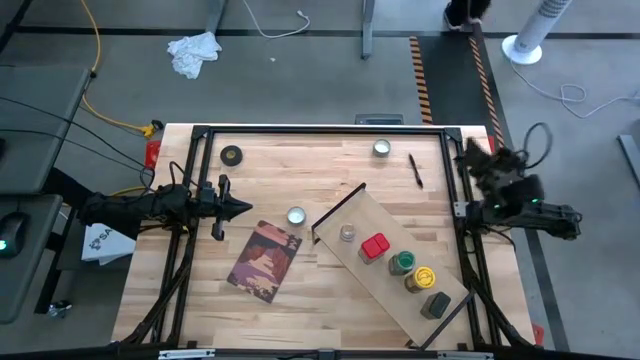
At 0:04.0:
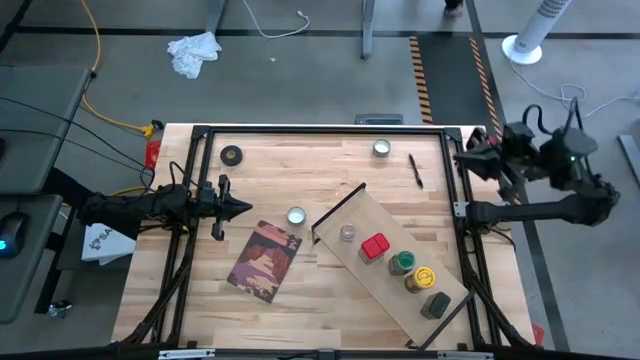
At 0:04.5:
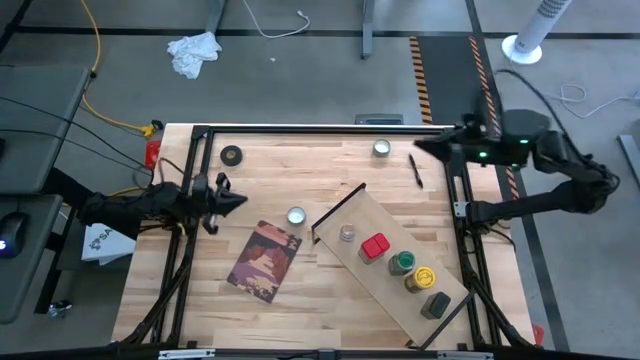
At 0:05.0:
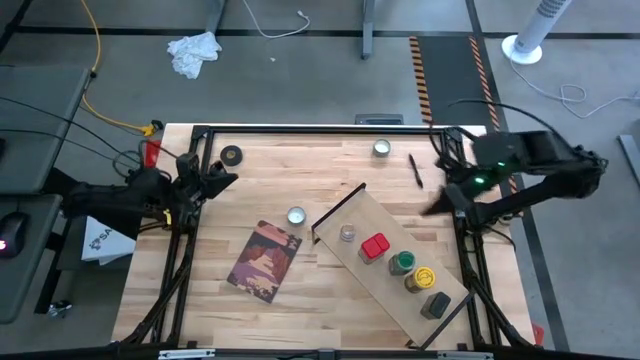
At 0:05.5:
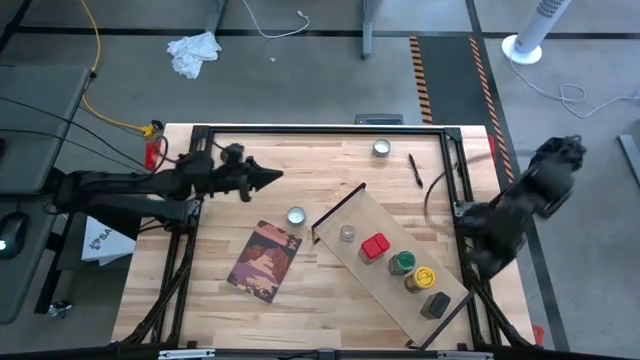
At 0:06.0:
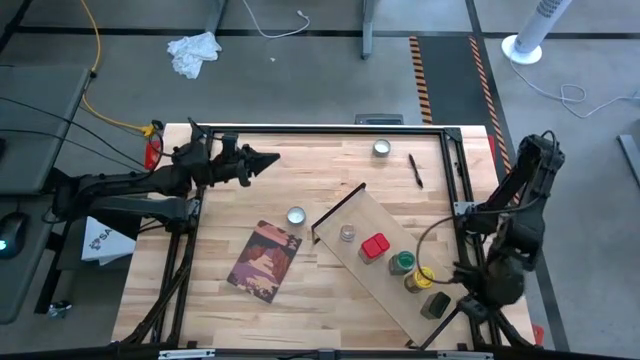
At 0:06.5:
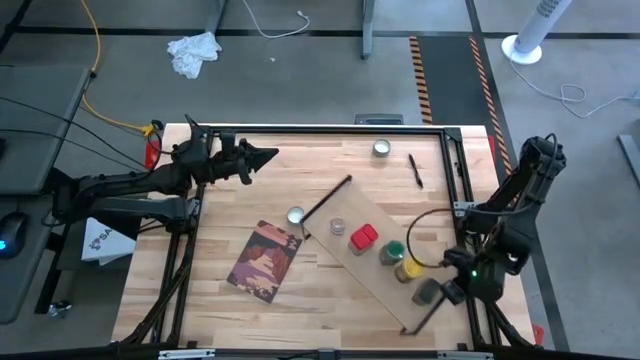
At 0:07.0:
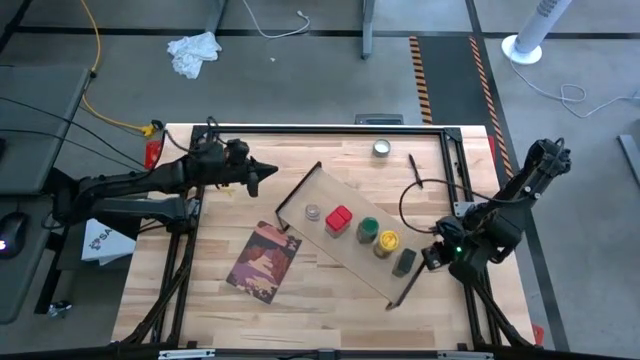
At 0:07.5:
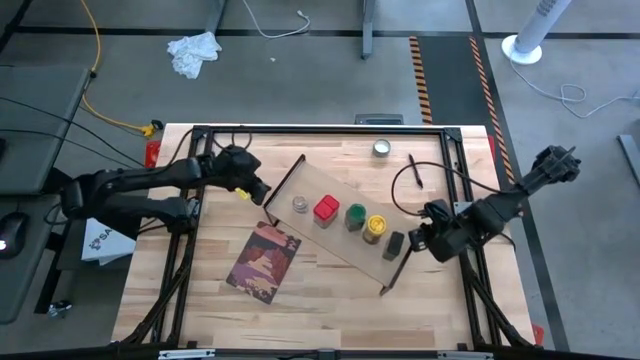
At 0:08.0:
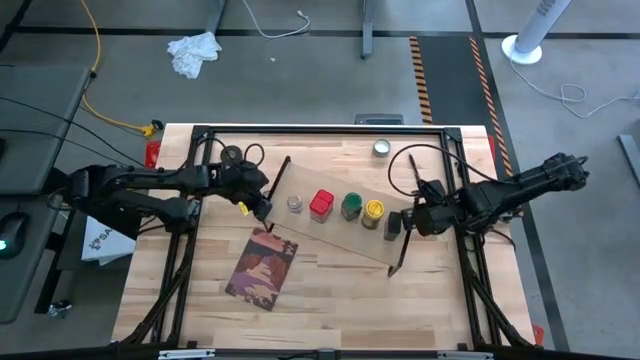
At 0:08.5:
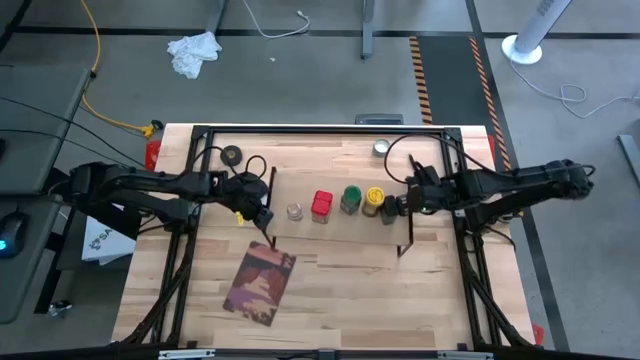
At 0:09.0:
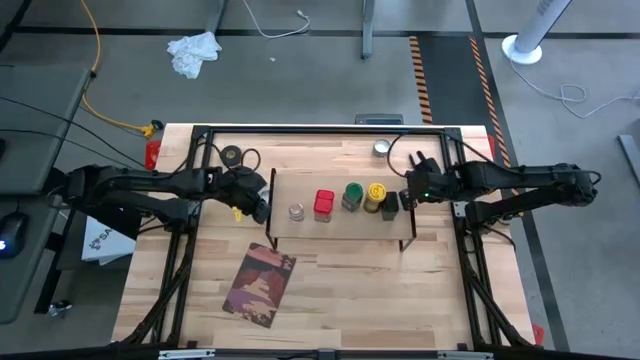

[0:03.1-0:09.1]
Task: Shelf spices
Adjust the shelf

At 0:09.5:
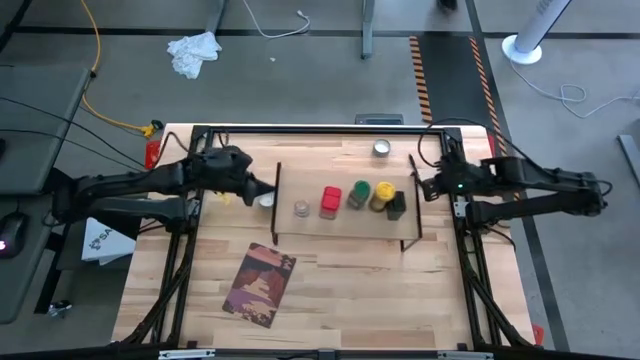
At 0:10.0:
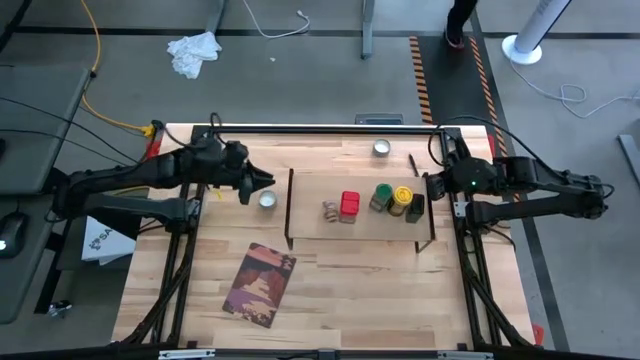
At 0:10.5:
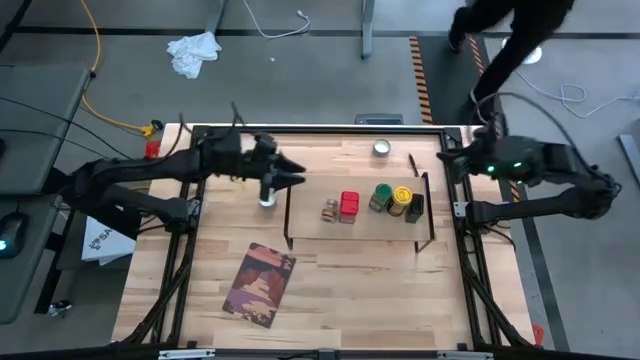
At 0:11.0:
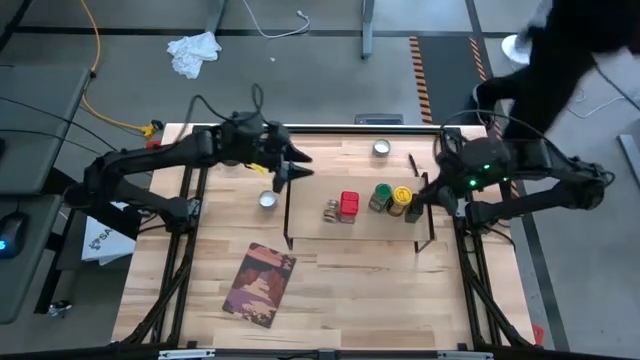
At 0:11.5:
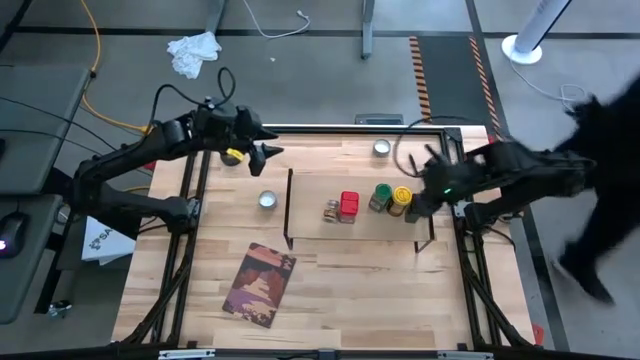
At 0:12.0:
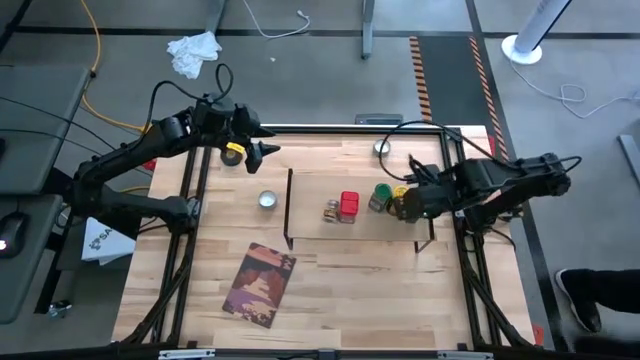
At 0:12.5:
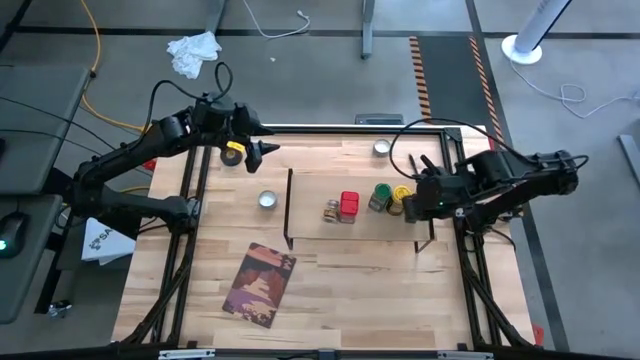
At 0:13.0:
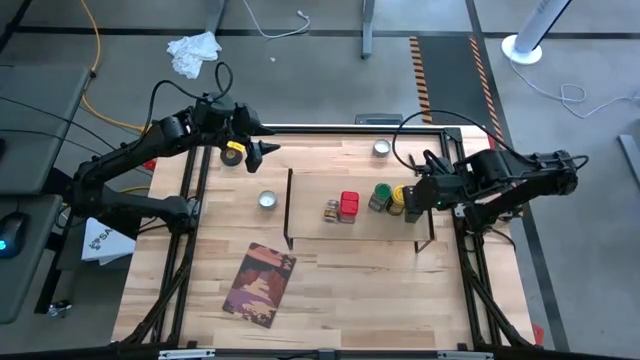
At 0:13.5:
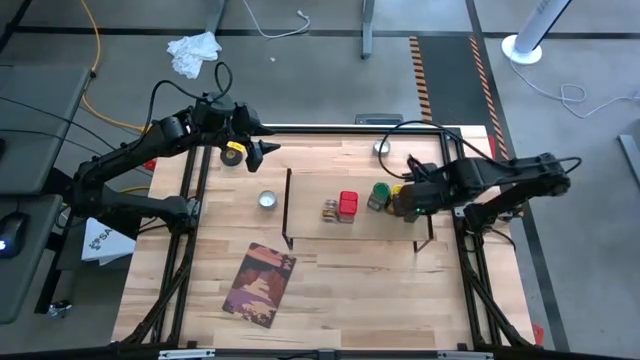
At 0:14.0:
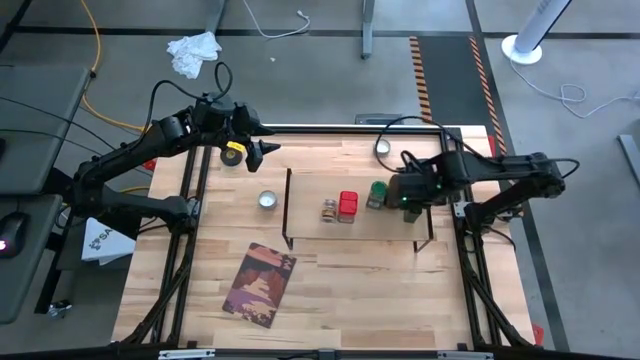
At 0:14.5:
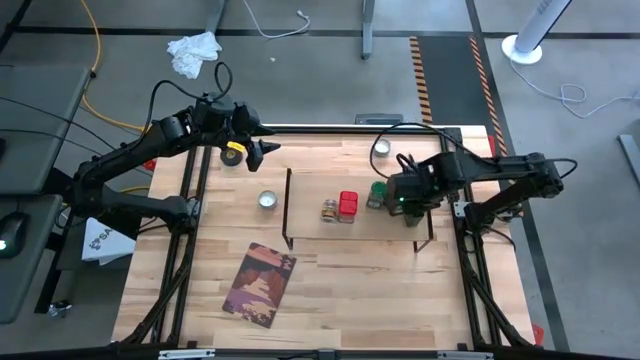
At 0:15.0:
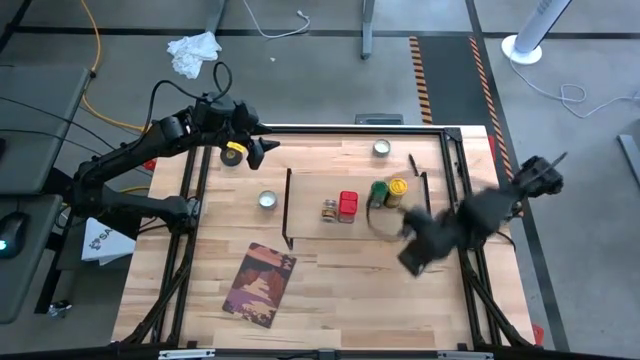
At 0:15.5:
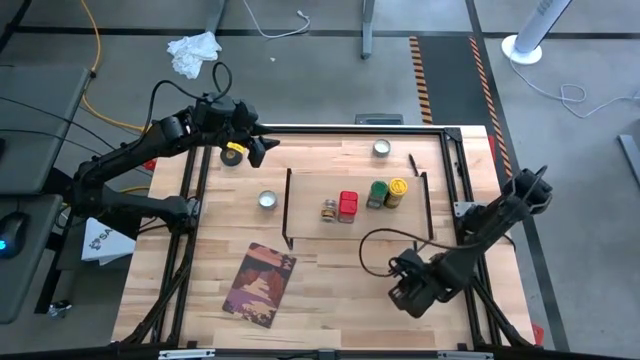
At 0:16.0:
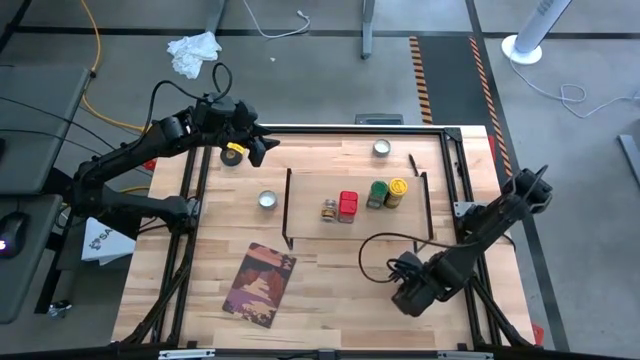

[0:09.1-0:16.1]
Remove the black seasoning can from the shelf

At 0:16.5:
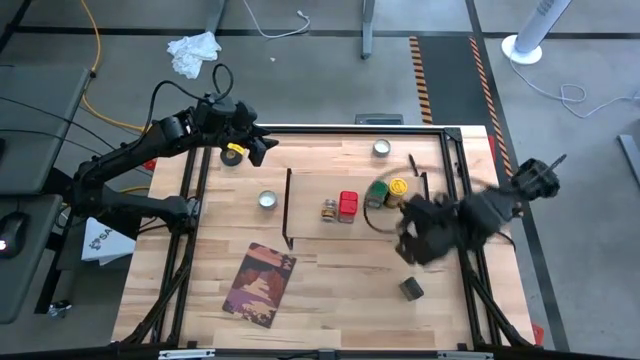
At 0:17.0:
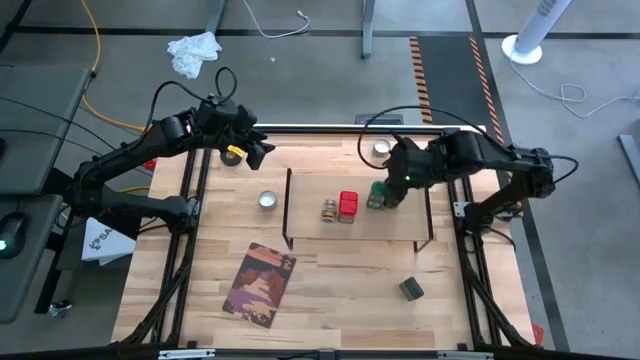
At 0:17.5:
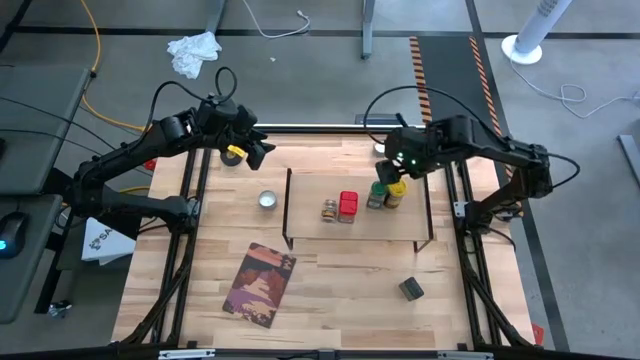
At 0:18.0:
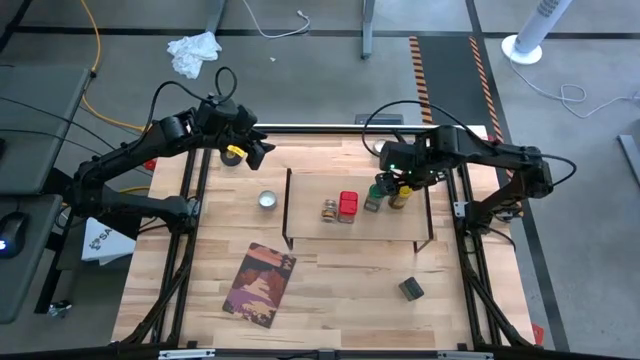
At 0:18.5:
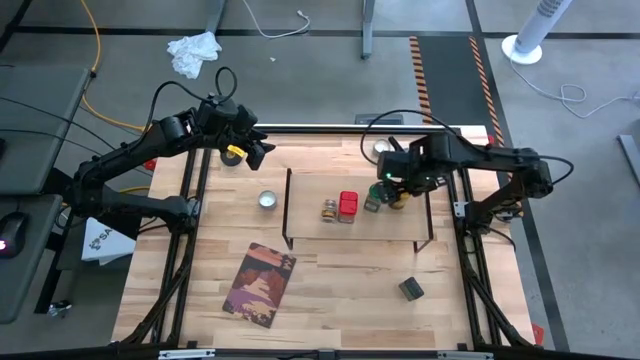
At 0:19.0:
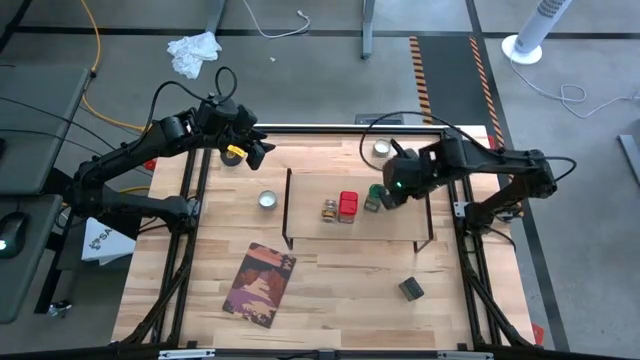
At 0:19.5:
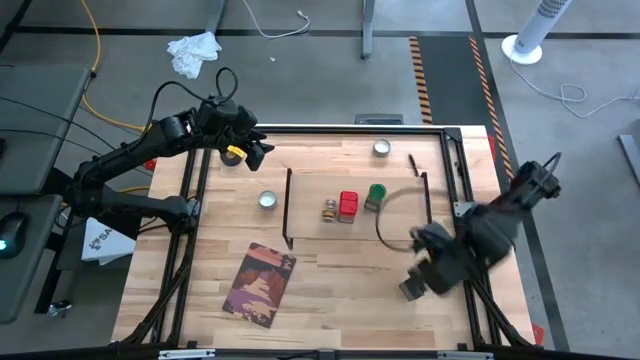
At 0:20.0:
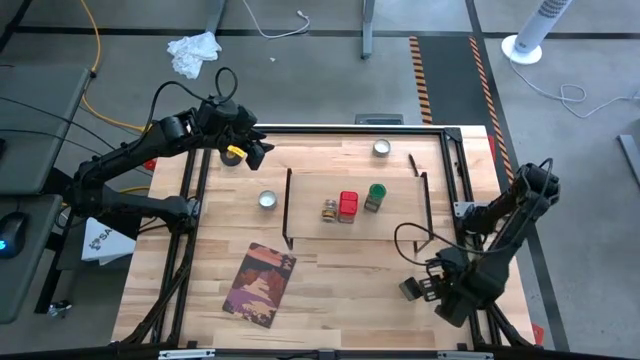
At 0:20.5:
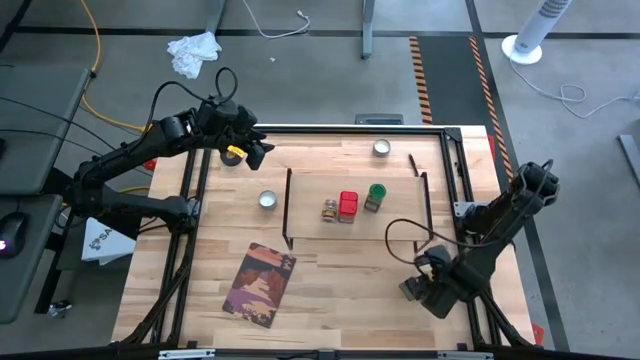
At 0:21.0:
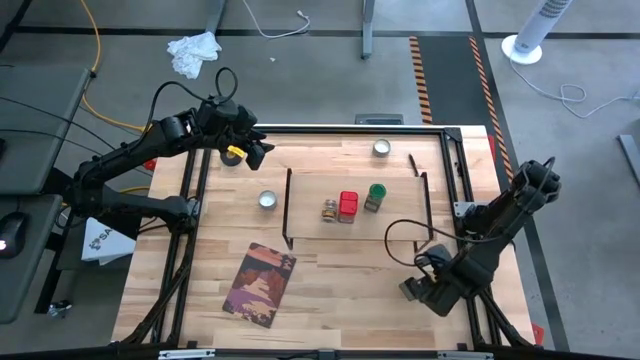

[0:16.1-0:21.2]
Remove the yellow seasoning bottle from the shelf

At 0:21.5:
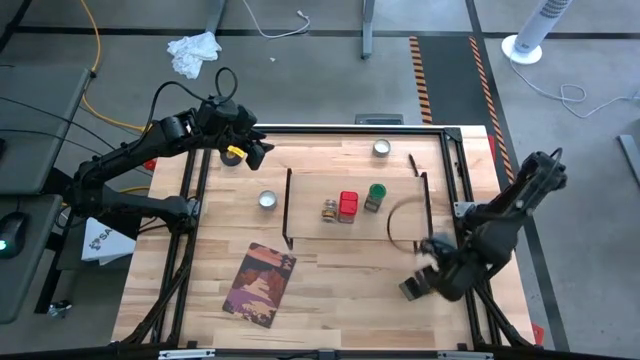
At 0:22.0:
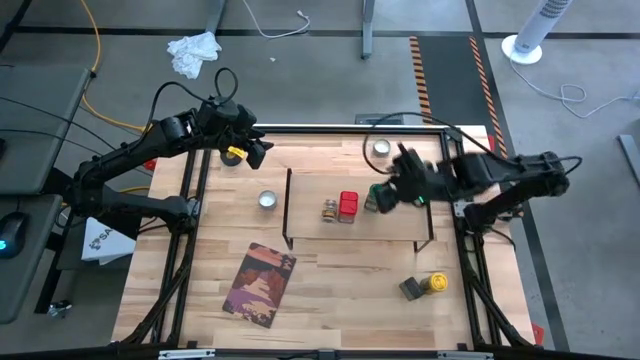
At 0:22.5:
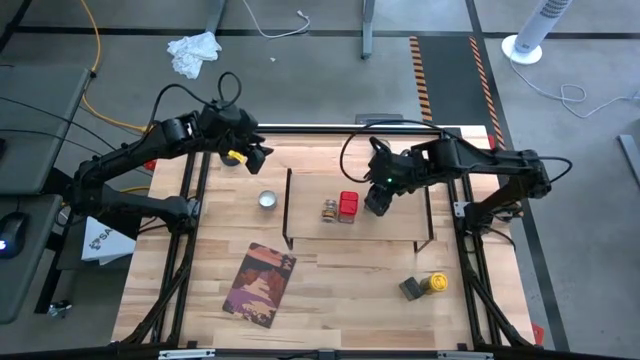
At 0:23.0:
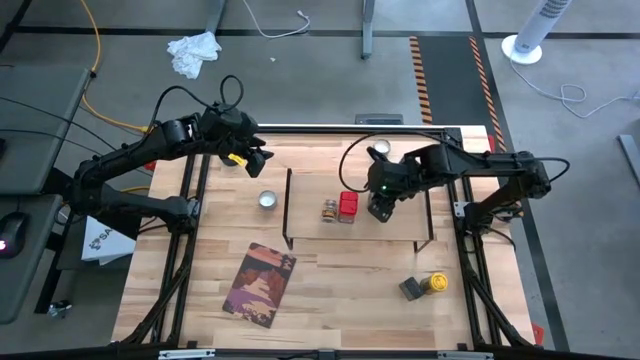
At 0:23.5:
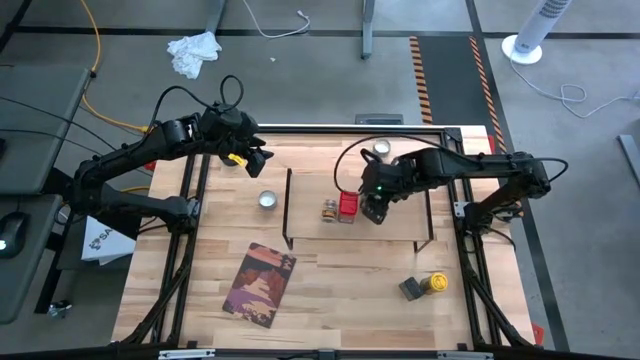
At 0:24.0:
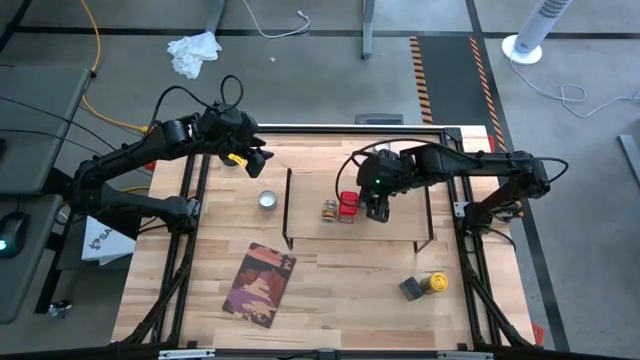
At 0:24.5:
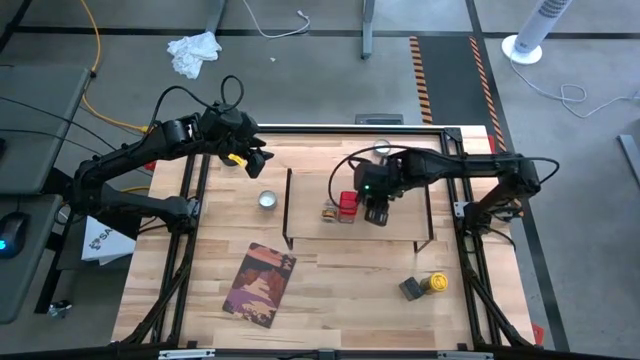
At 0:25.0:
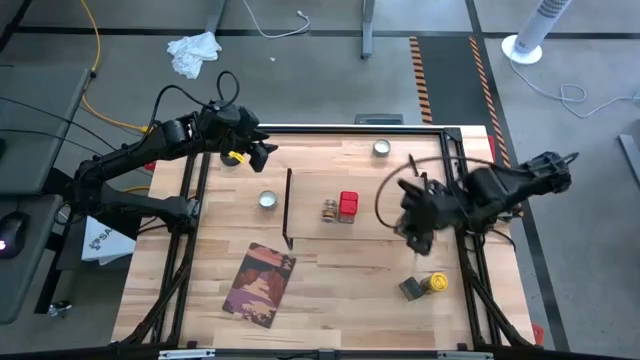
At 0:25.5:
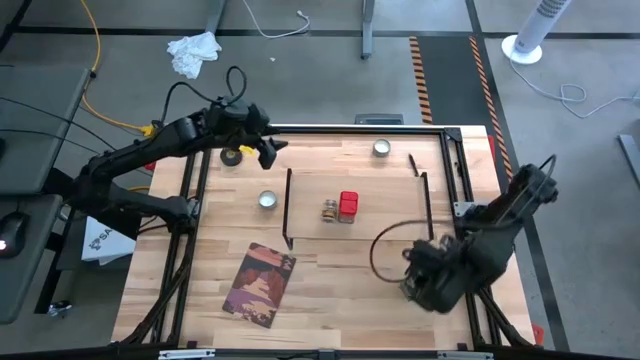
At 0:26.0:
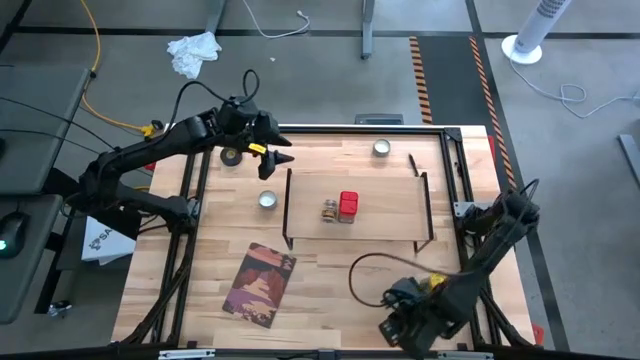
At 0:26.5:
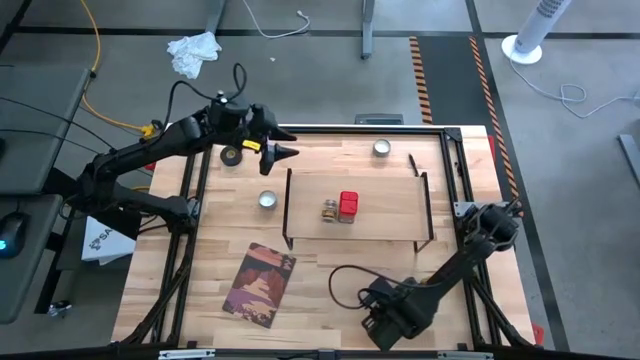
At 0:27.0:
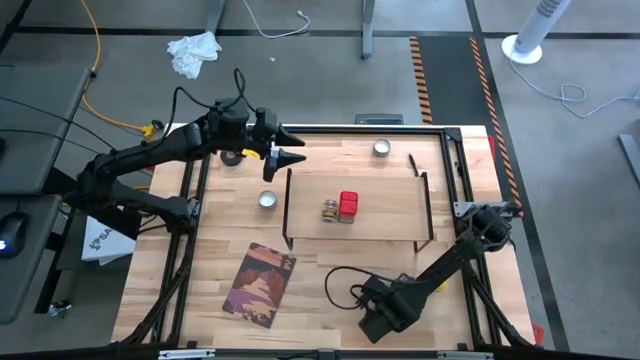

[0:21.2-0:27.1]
Remove the green seasoning bottle from the shelf
